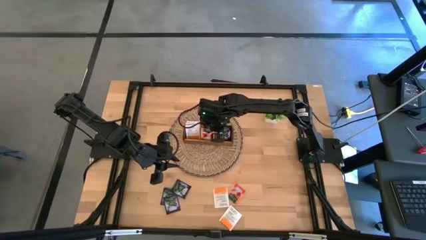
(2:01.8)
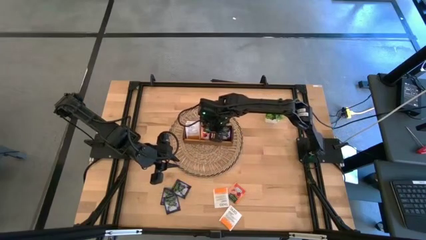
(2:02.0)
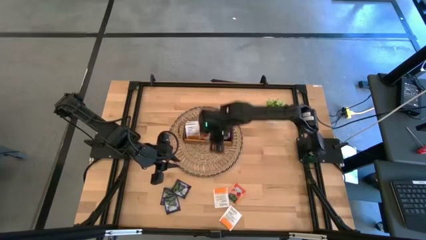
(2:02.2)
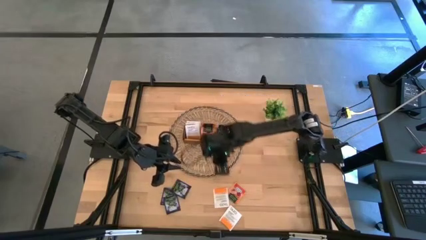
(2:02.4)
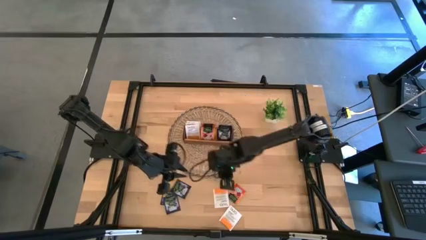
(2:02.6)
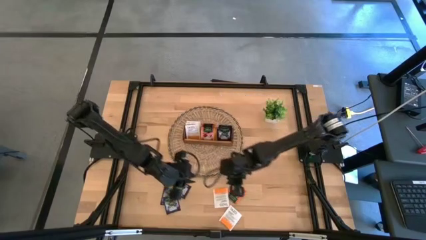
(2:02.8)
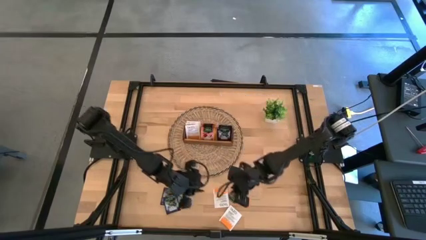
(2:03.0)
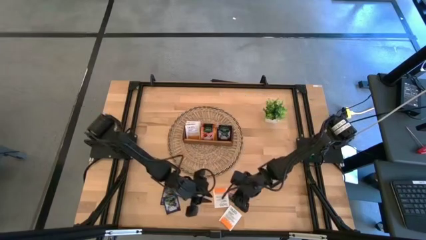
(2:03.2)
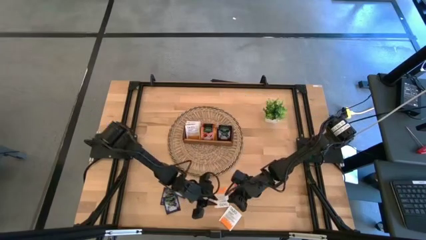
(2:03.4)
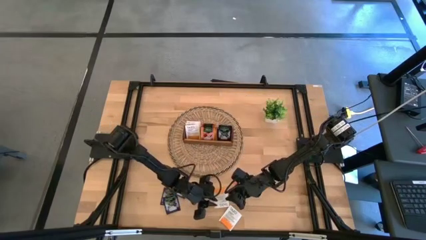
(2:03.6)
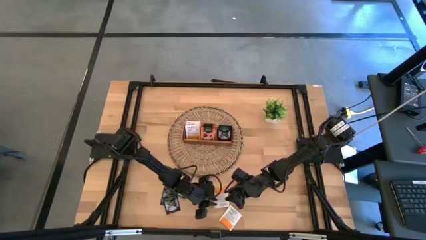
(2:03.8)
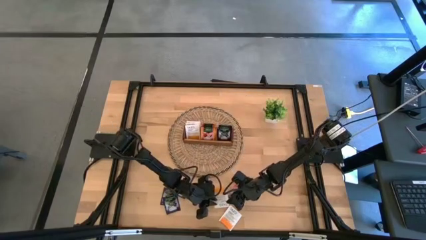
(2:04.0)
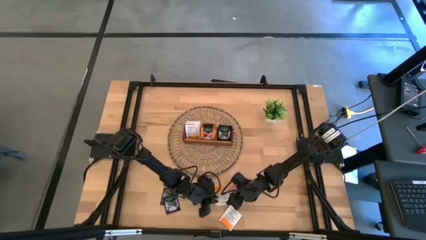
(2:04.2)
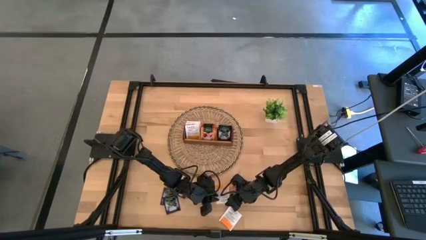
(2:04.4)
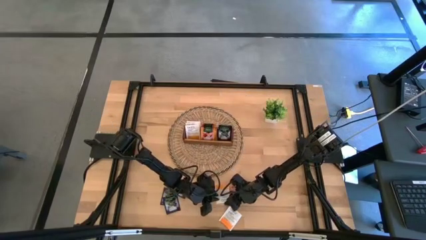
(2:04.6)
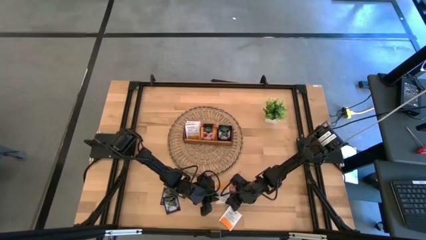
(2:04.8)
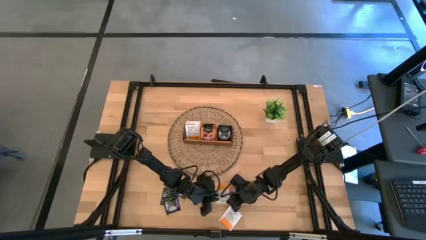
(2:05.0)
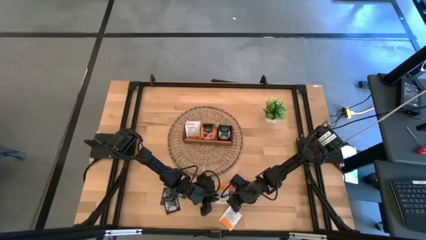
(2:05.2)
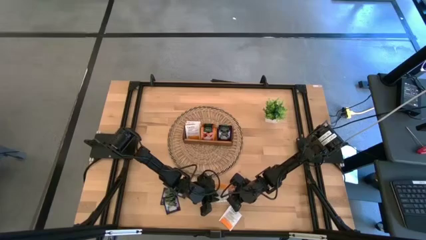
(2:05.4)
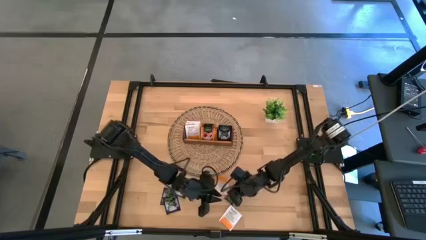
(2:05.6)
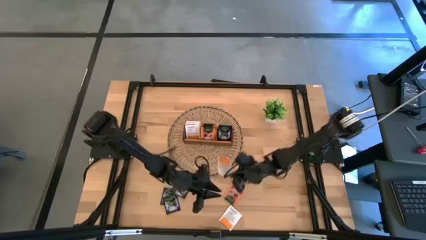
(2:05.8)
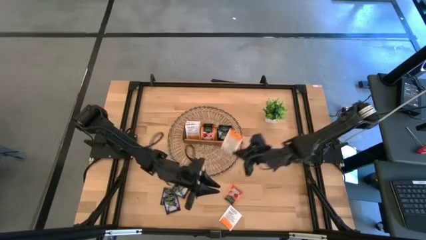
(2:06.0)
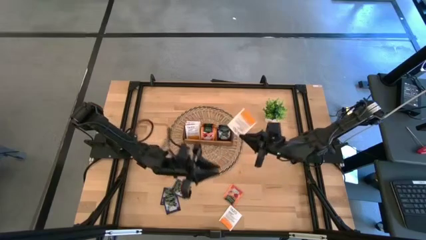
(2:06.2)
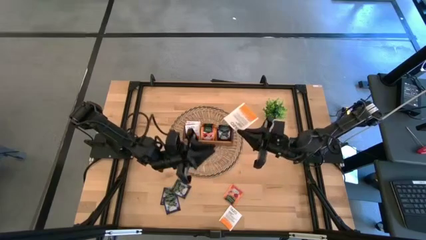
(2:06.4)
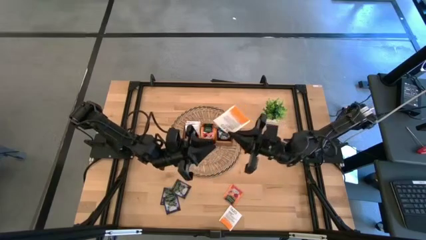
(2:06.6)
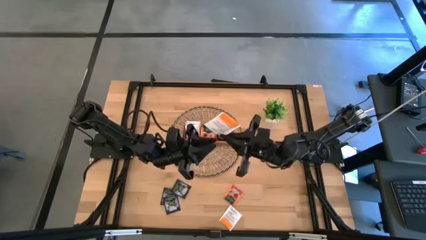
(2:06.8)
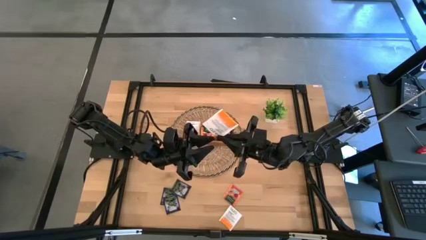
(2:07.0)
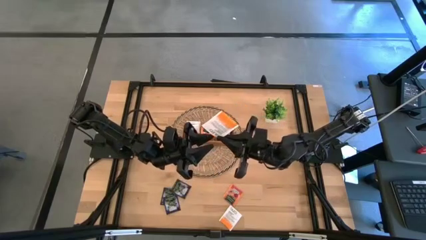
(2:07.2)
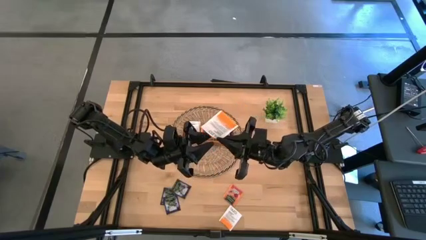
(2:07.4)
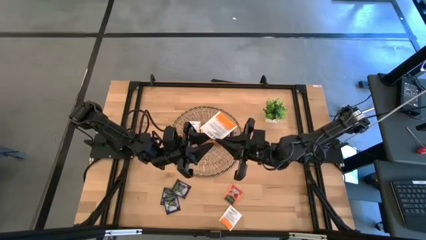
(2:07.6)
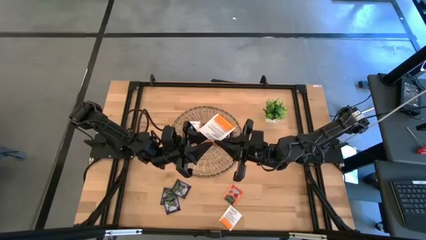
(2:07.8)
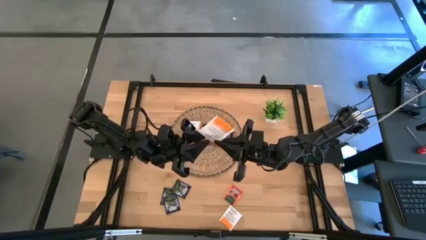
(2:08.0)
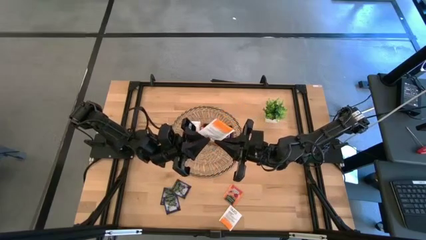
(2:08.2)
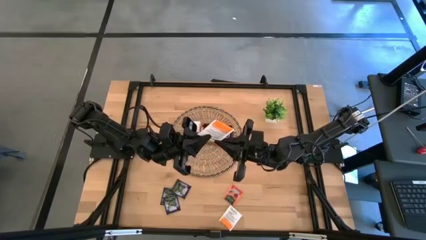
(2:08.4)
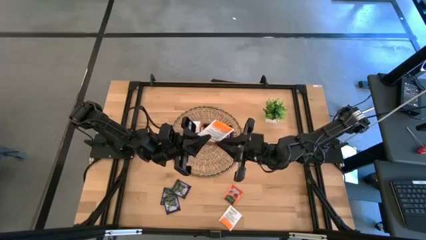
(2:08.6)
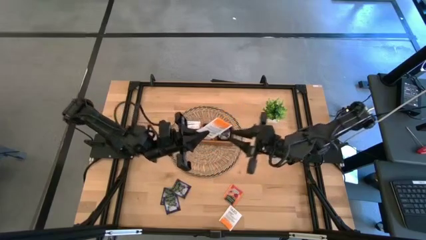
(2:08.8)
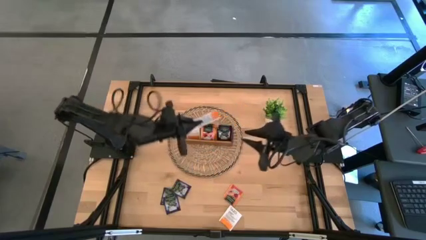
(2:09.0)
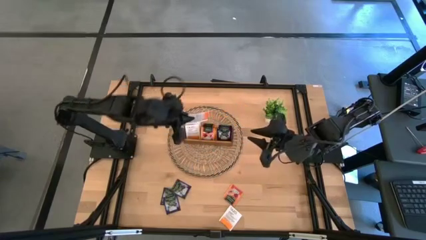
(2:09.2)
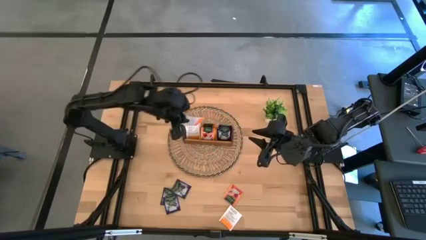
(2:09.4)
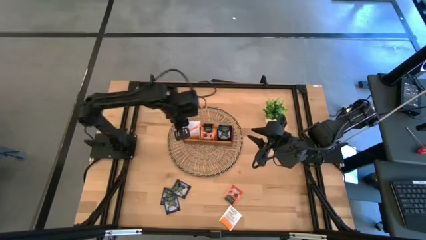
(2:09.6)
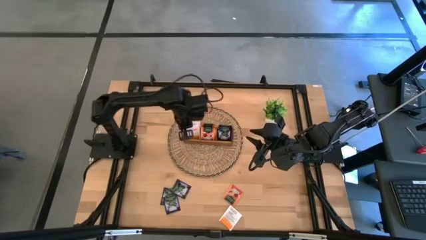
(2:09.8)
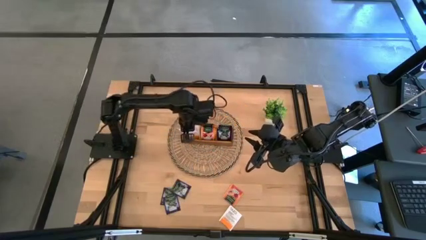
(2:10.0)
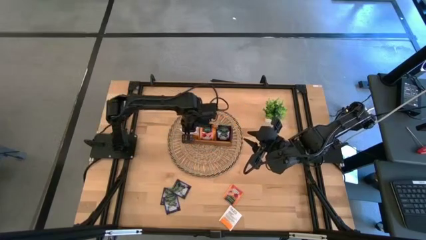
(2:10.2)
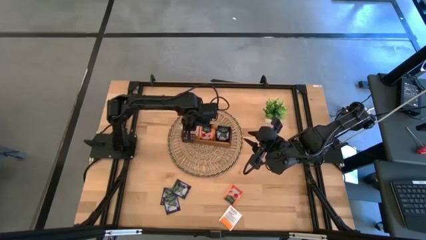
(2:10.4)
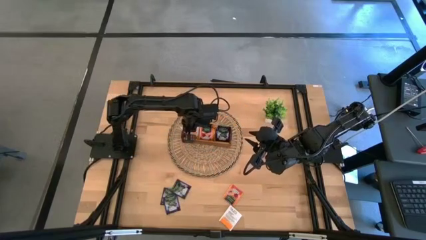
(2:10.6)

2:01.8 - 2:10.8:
Task: Pick & Place Tea
Put the white tea bag into the left section of the wooden organizer

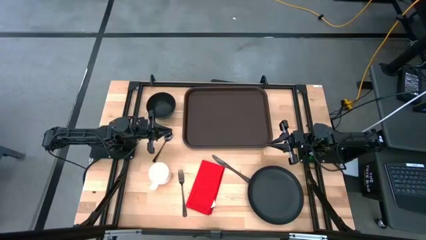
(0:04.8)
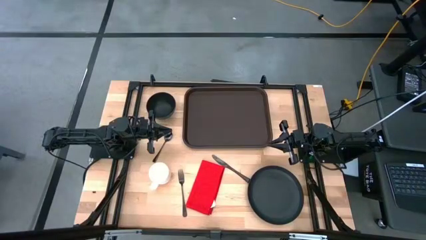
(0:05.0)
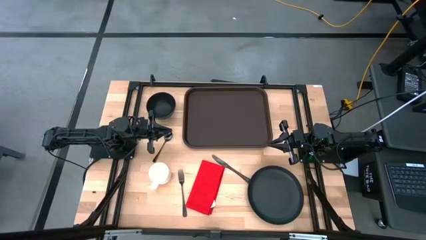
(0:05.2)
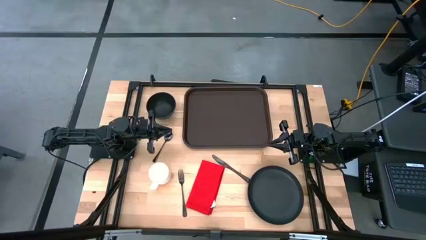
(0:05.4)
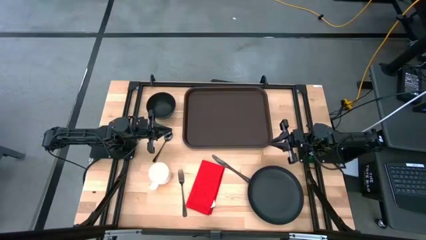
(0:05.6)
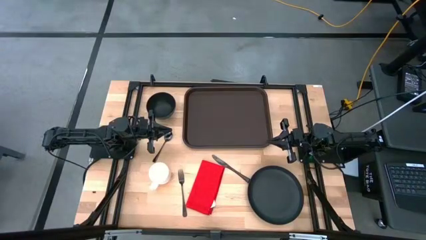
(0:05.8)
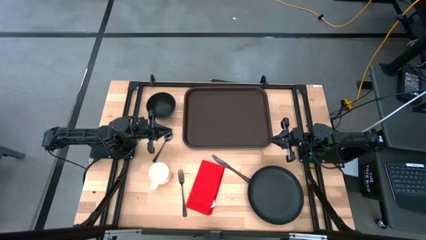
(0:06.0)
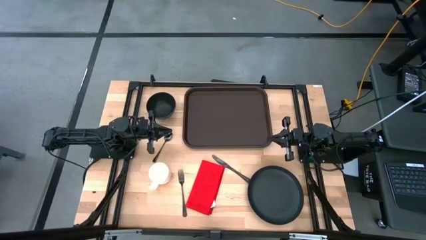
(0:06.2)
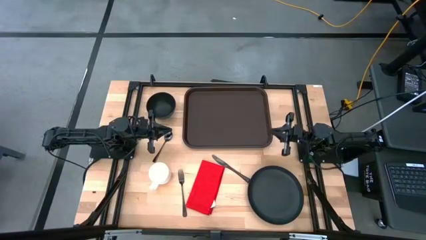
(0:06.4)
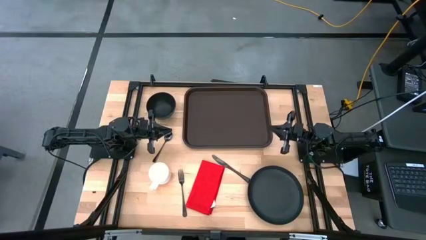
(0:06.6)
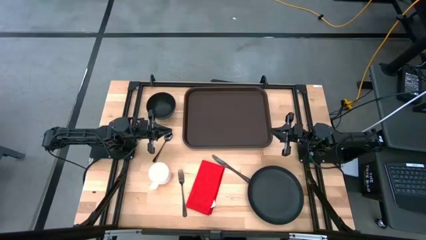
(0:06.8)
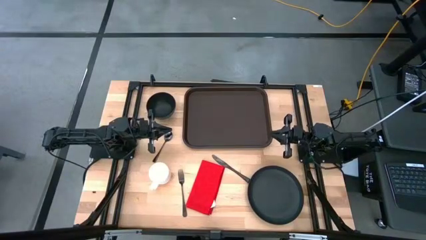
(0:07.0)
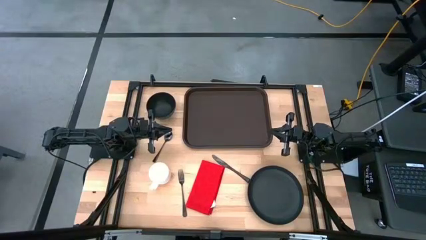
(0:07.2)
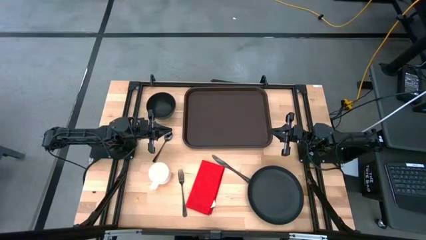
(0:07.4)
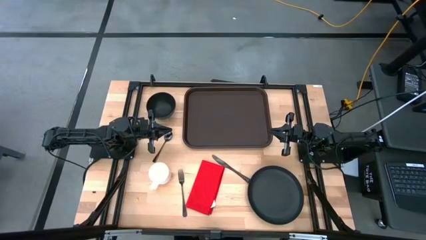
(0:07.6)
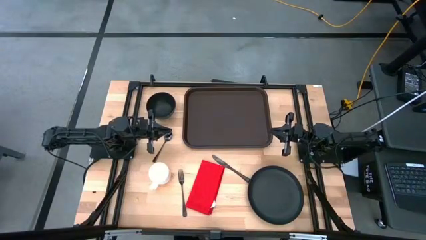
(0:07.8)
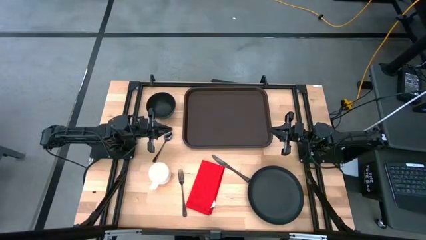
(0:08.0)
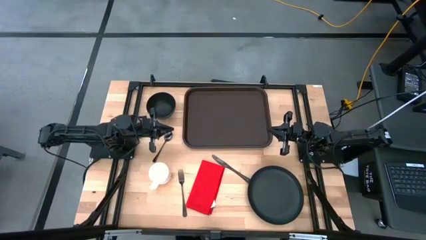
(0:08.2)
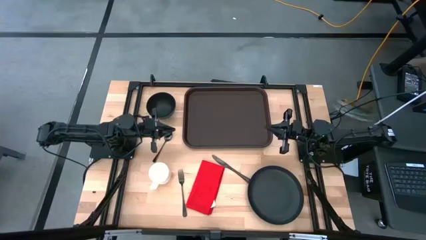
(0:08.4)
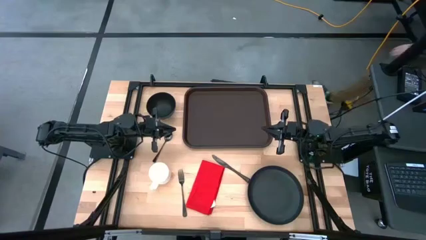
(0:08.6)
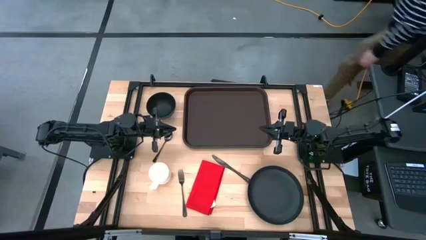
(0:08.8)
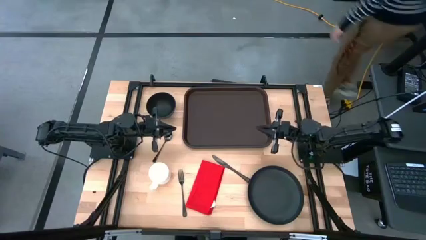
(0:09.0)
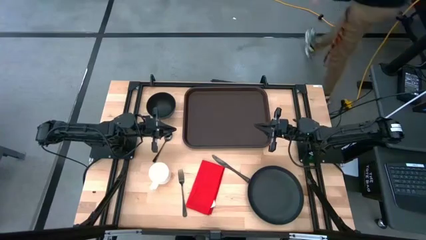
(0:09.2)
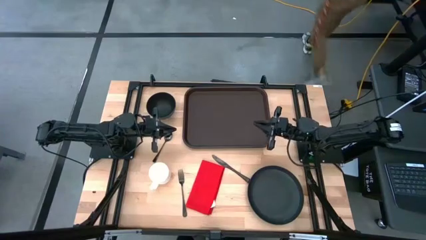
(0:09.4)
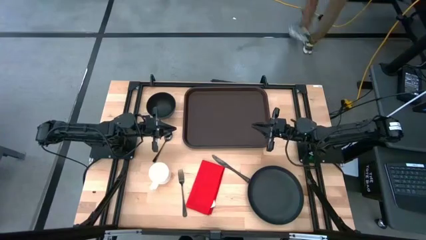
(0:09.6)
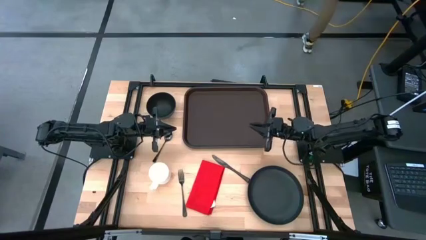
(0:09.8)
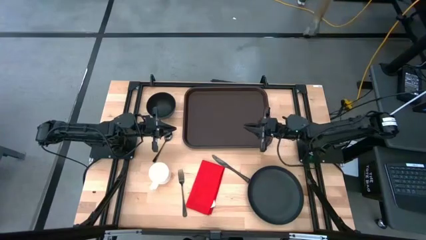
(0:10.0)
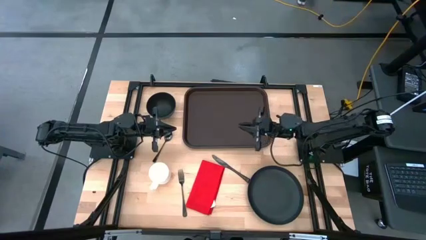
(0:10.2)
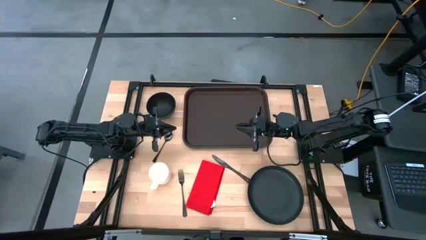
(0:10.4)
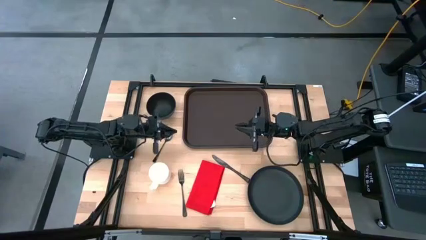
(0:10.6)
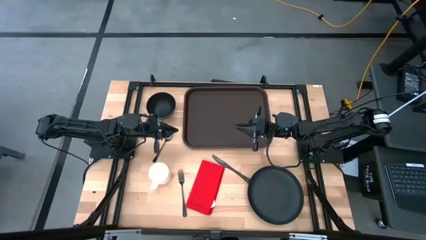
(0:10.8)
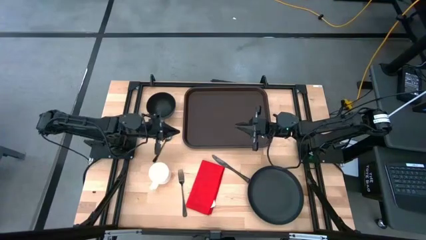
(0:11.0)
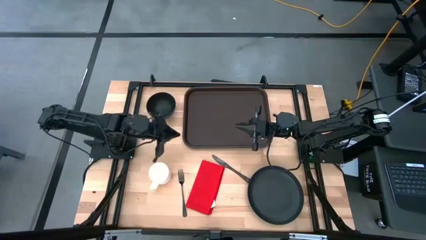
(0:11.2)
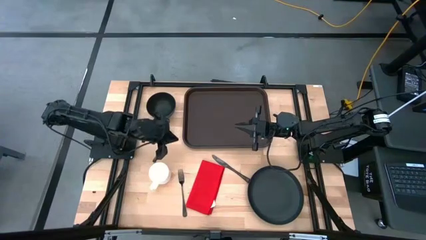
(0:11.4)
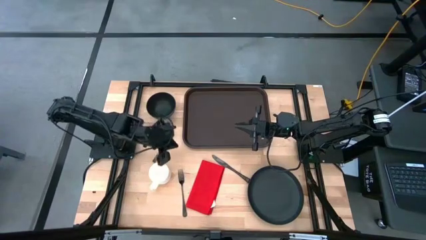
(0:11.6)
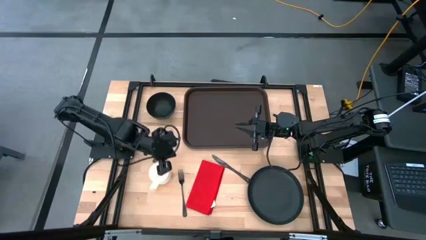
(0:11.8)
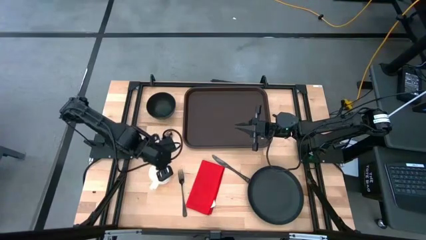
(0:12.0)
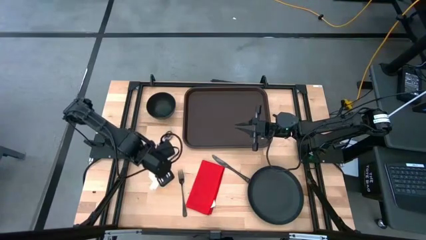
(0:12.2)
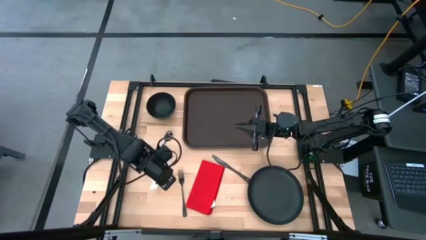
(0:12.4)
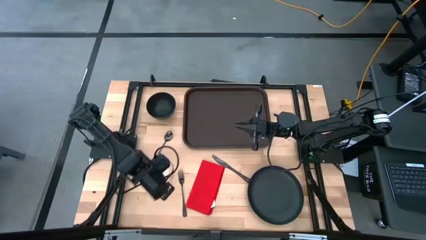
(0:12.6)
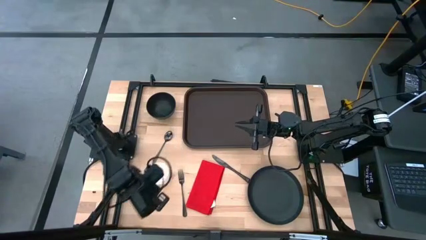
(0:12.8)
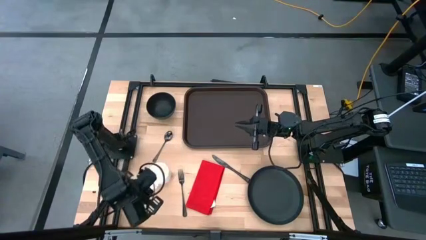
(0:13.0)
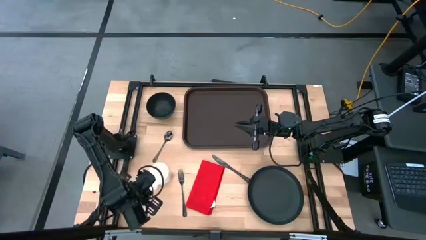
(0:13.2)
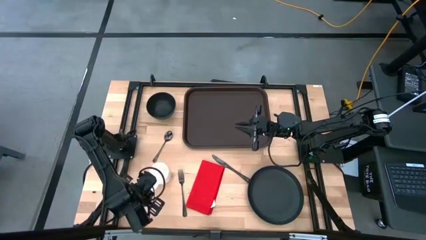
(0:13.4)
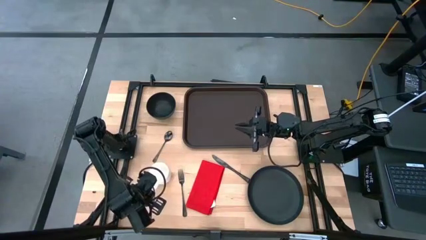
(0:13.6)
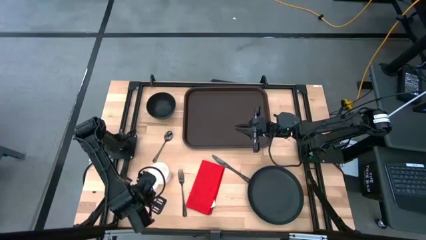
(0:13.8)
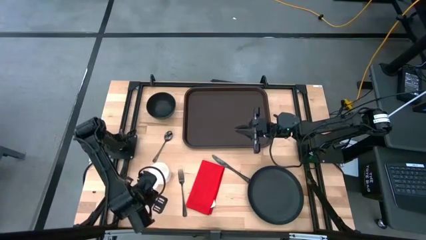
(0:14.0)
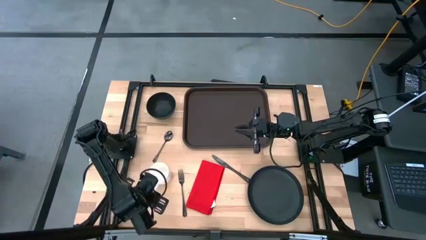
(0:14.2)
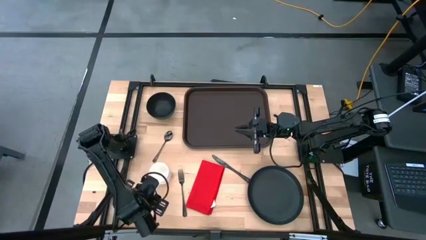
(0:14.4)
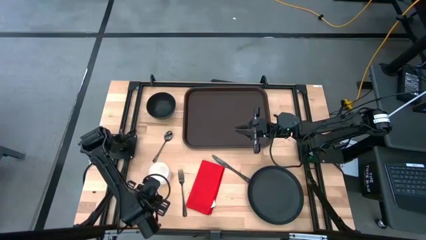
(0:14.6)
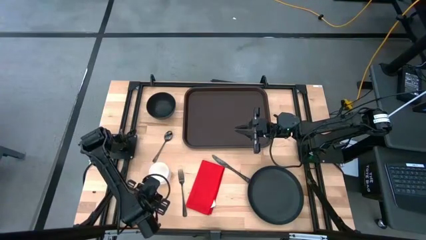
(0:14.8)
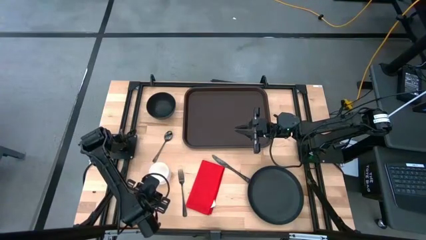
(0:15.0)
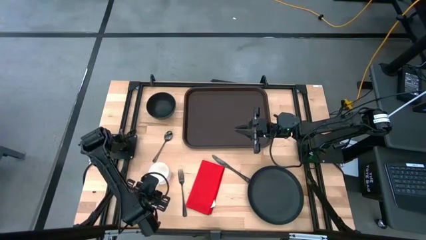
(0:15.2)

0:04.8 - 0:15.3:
Task: Set up tray
Put the white cup on the top left of the brown serving tray
